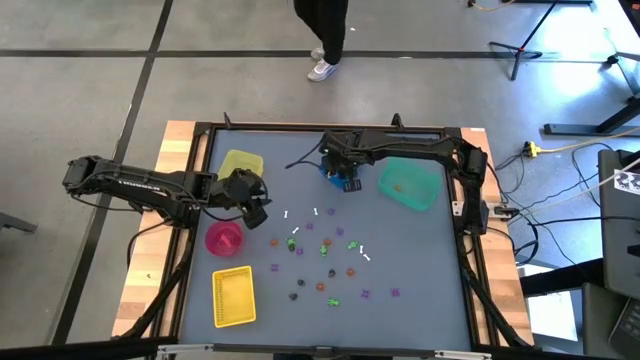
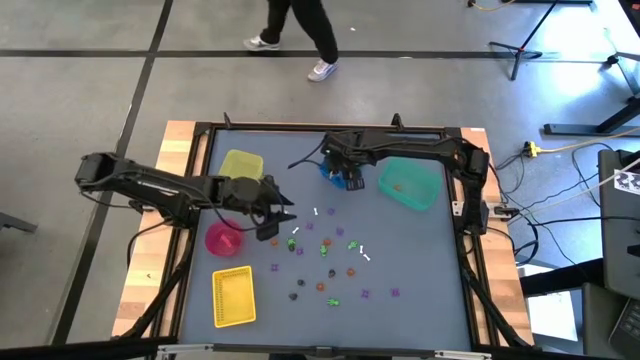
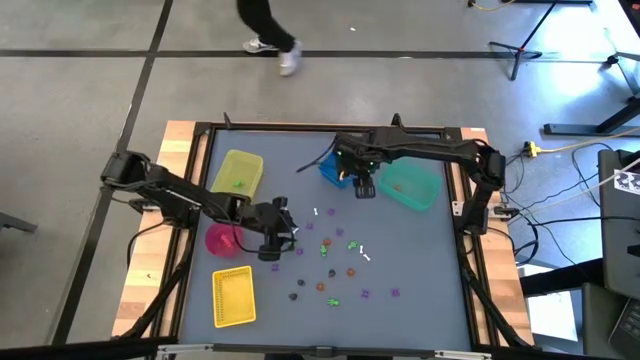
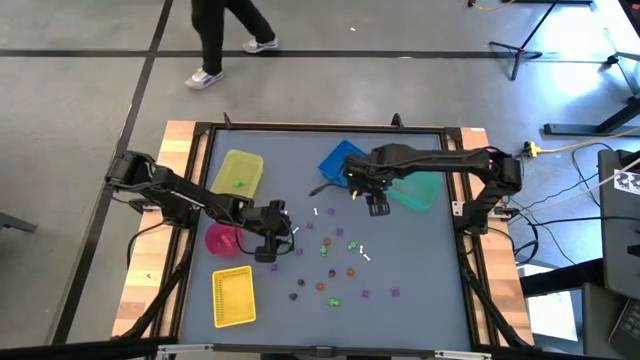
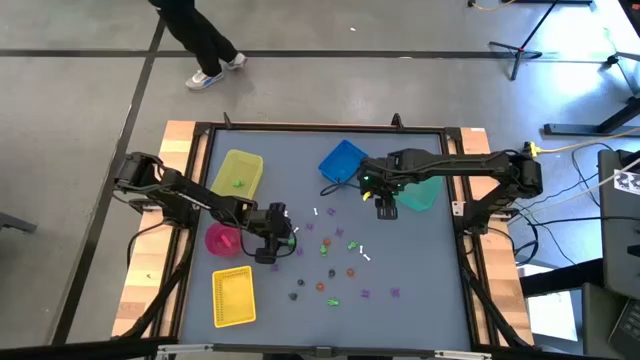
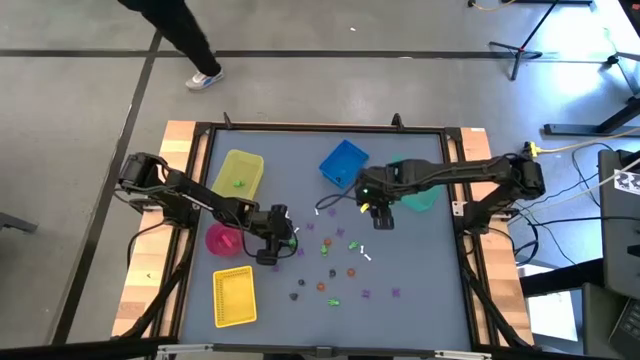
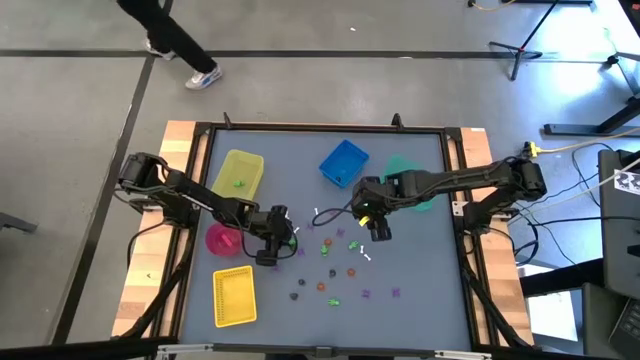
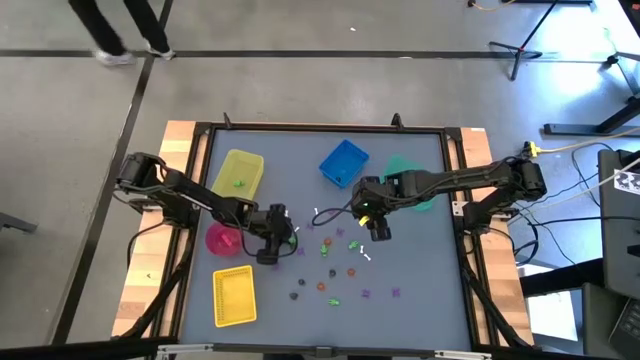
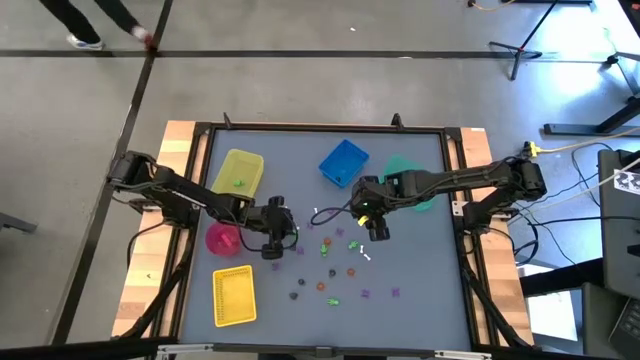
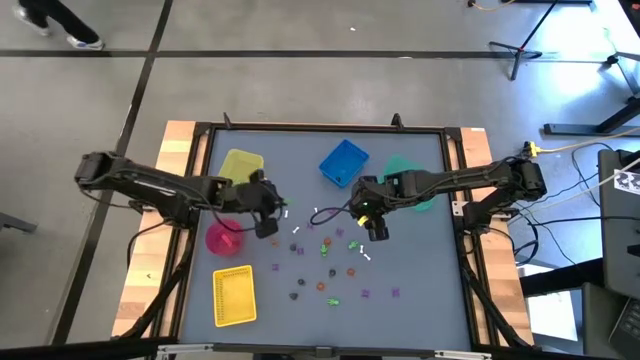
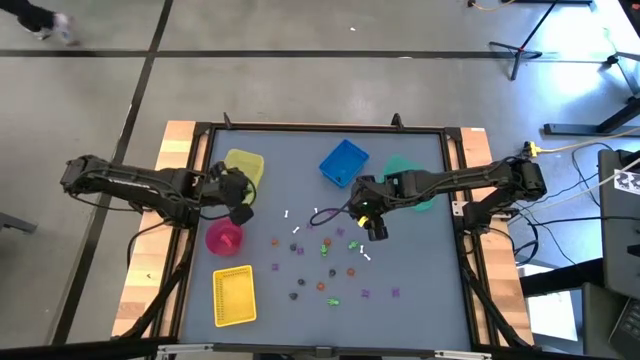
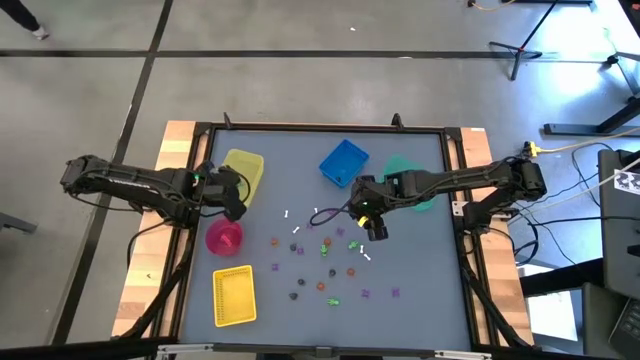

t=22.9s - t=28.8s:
Task: Sort Halloween decoration
Put the green skeleton toy into the yellow bin

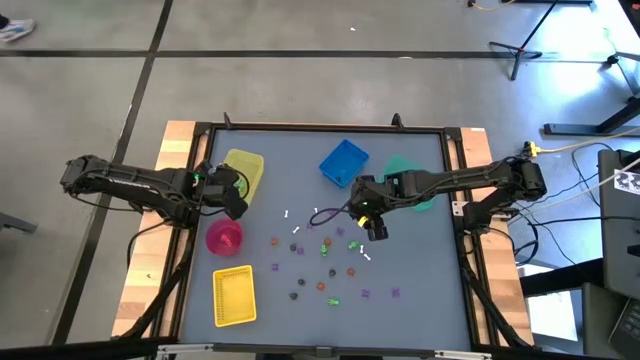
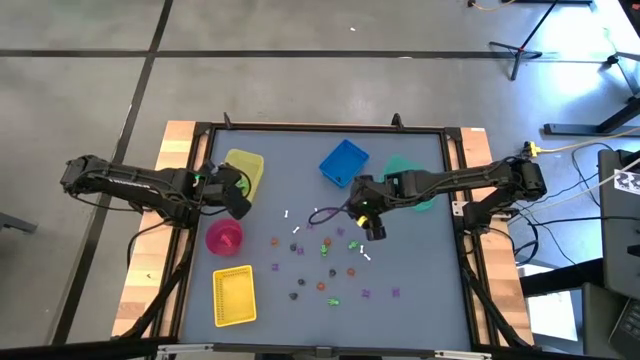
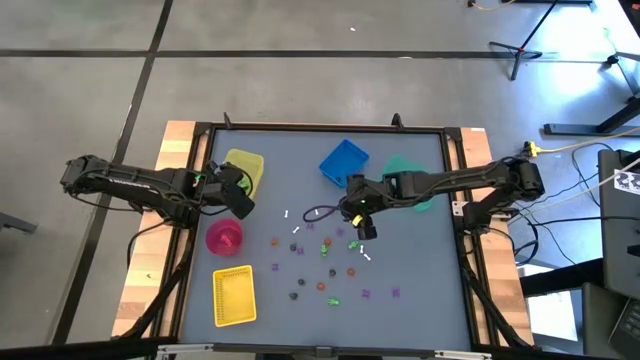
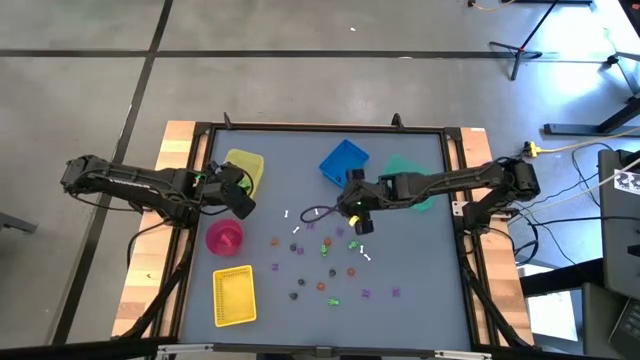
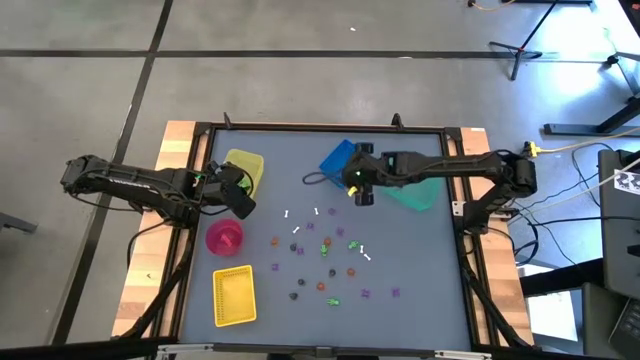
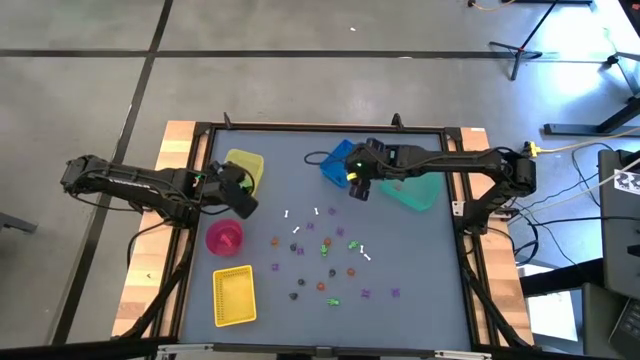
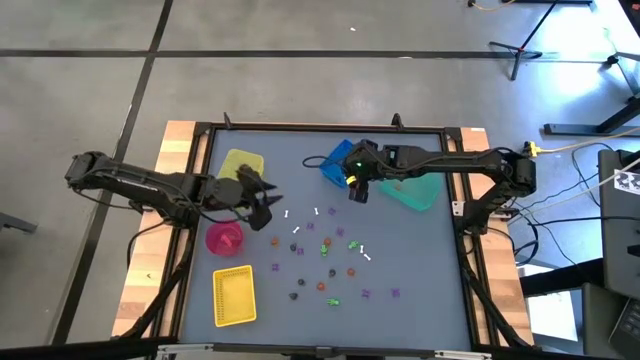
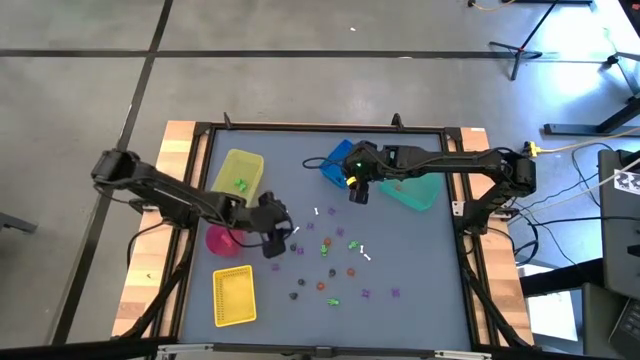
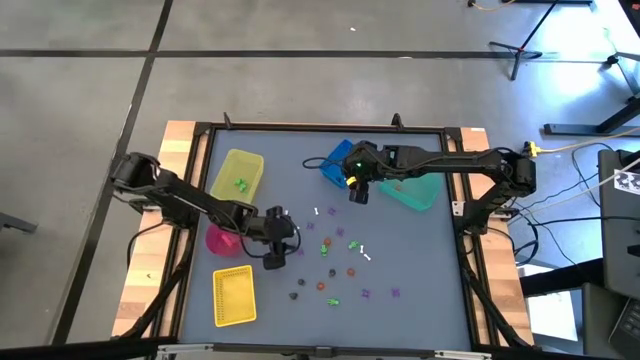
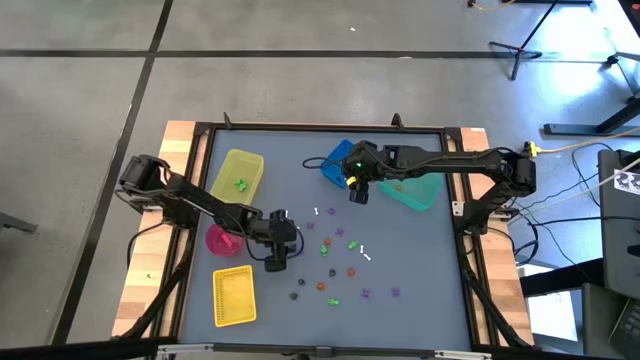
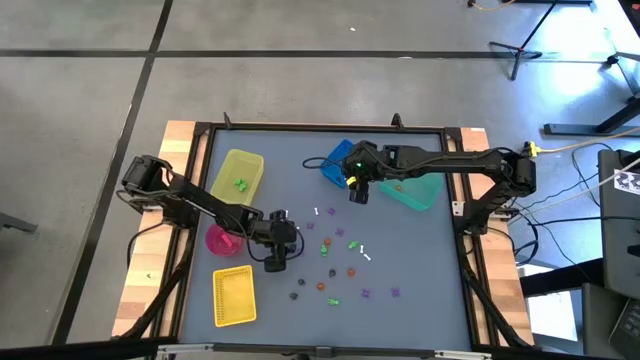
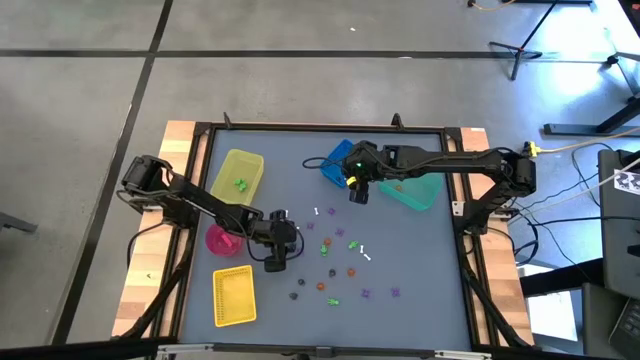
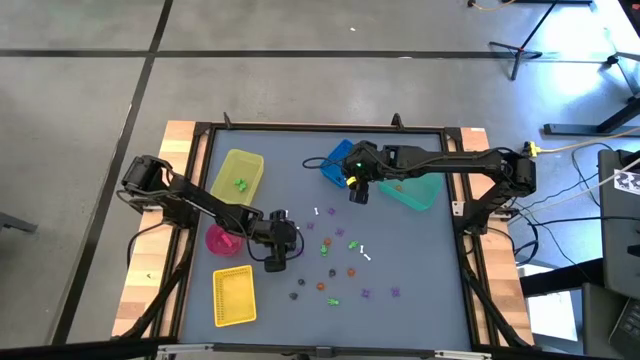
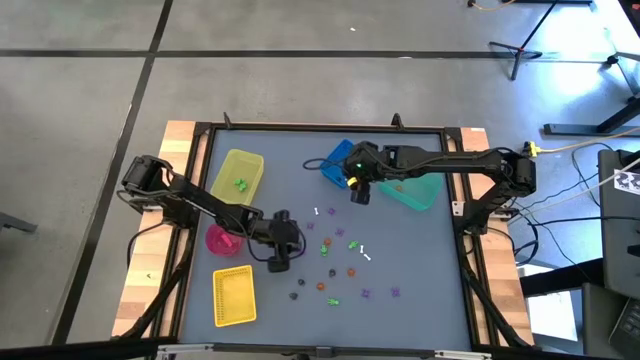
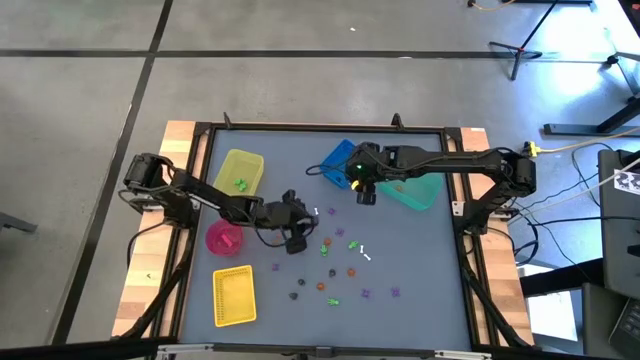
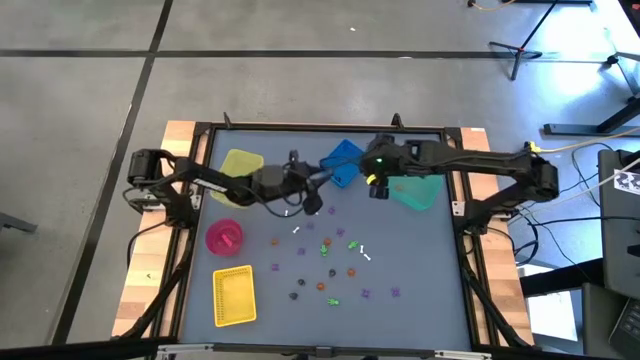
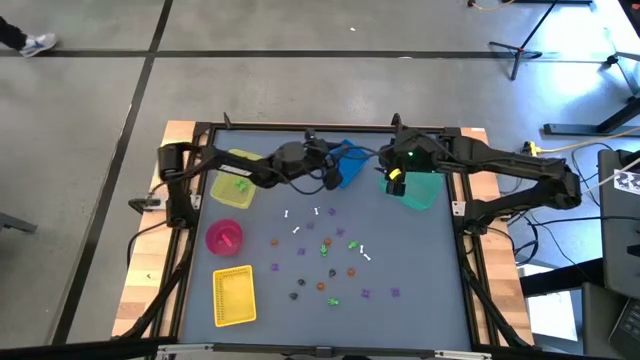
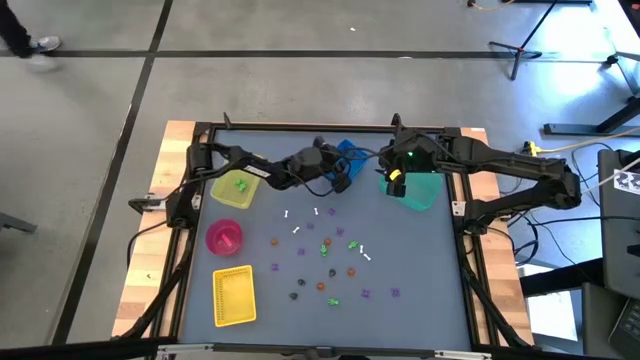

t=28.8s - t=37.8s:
Put the black skull toy into the blue basket

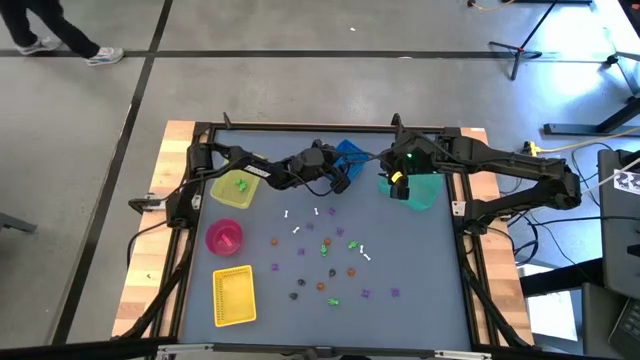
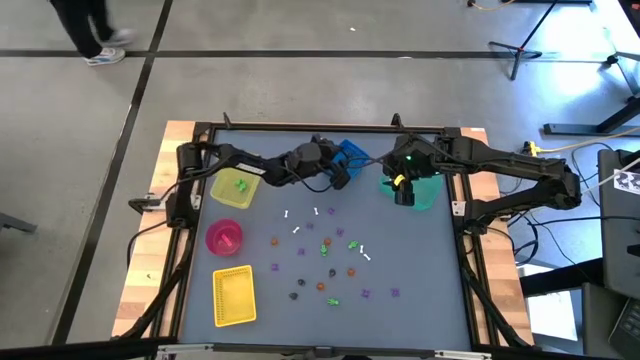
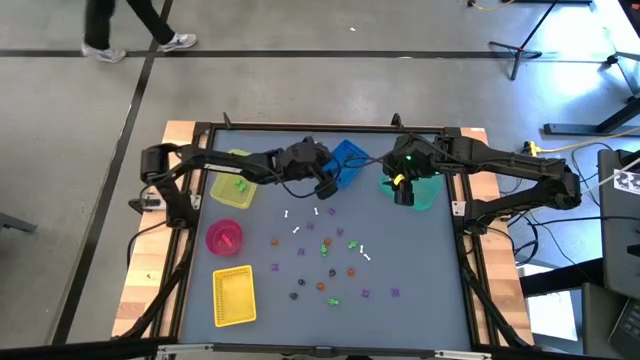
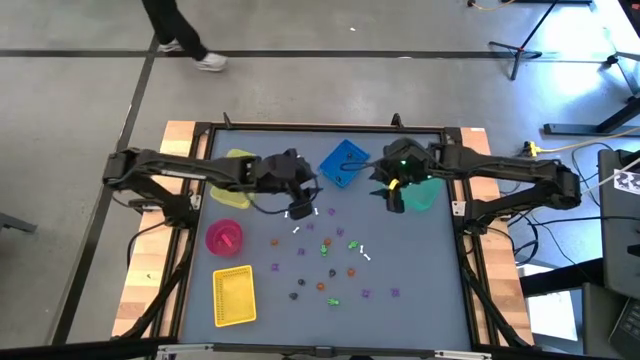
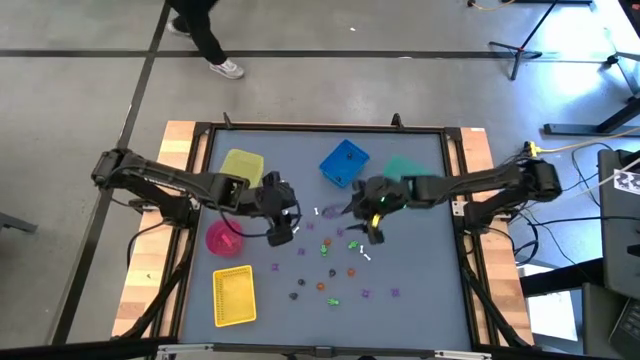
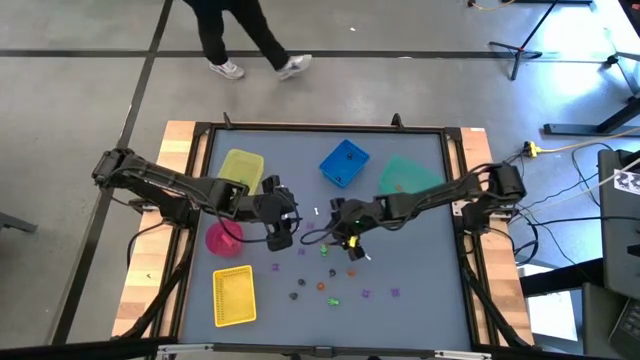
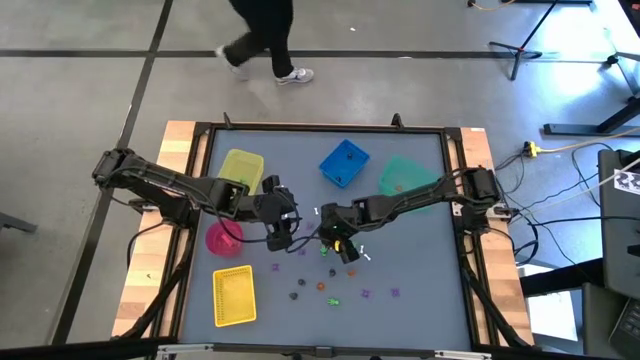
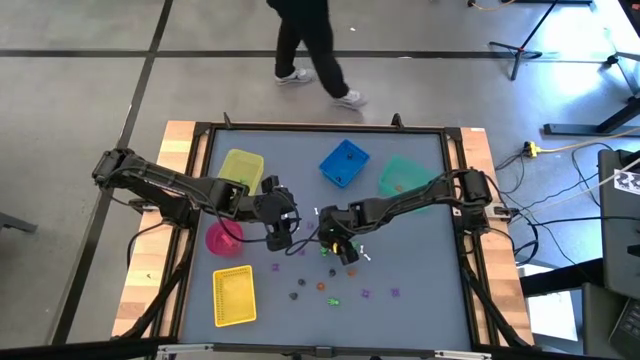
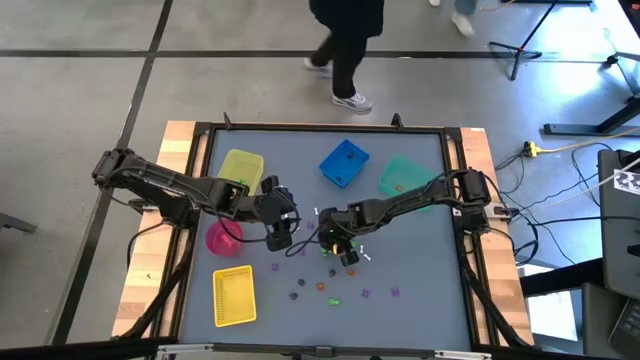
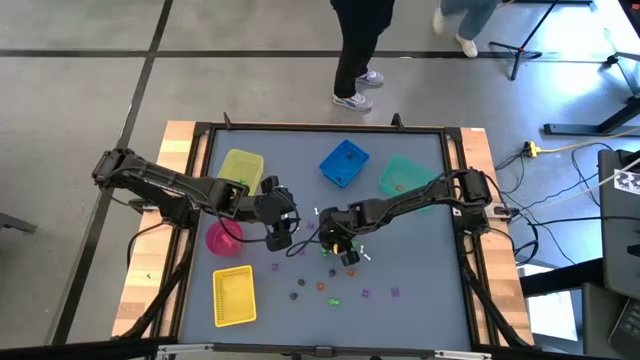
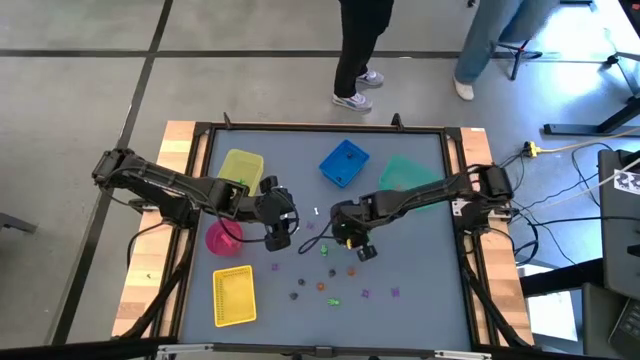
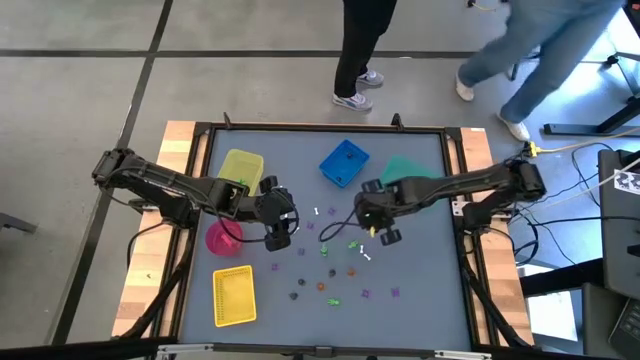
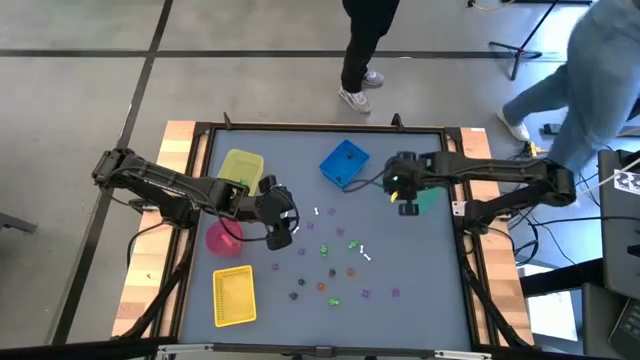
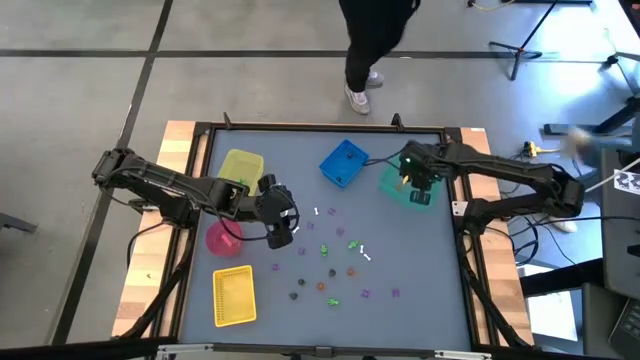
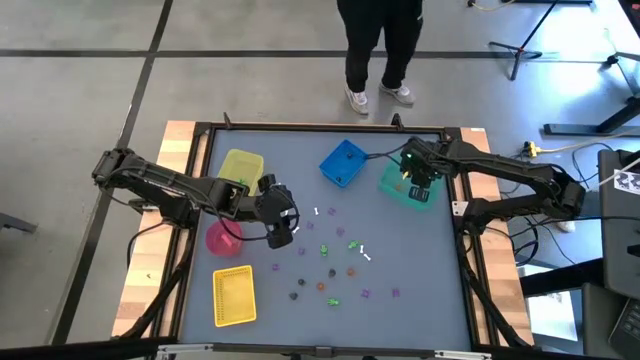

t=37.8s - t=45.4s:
Put the orange pumpkin toy into the green bin
